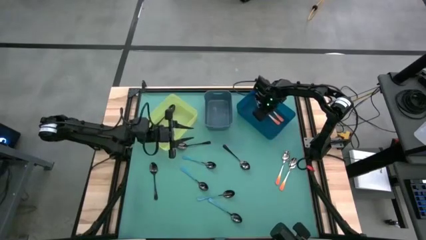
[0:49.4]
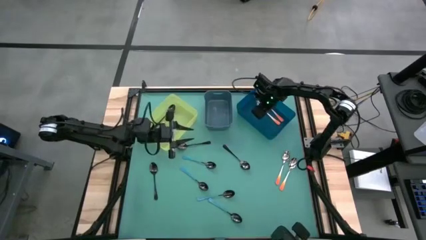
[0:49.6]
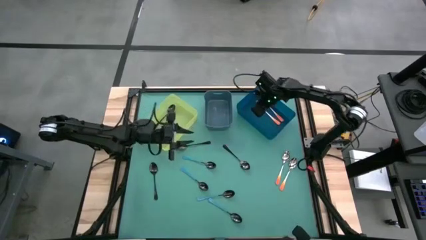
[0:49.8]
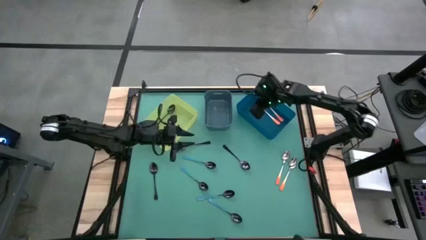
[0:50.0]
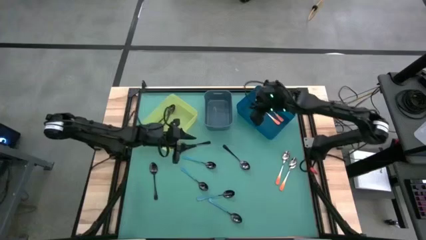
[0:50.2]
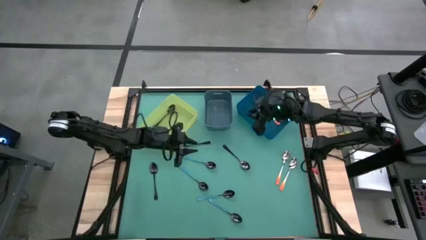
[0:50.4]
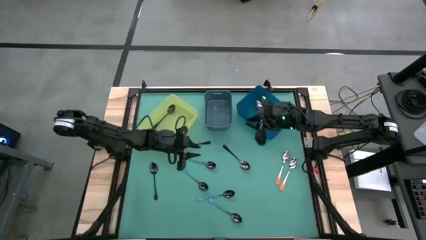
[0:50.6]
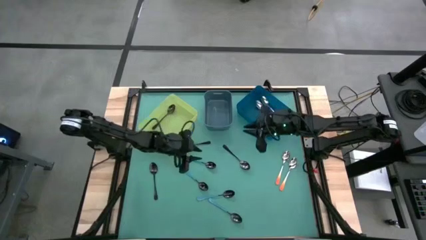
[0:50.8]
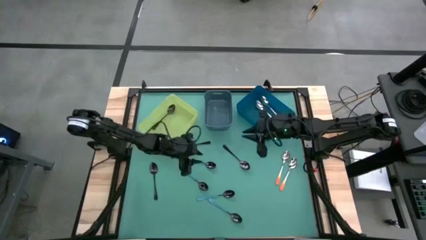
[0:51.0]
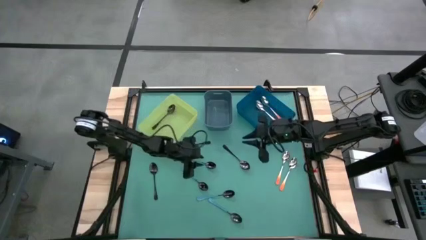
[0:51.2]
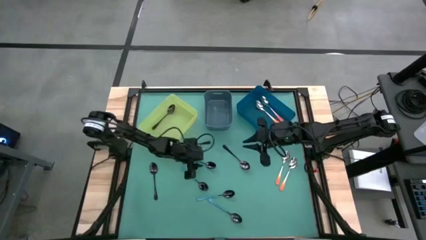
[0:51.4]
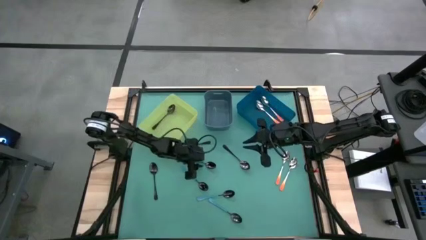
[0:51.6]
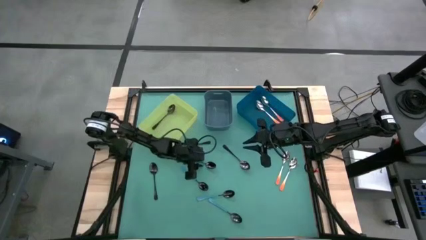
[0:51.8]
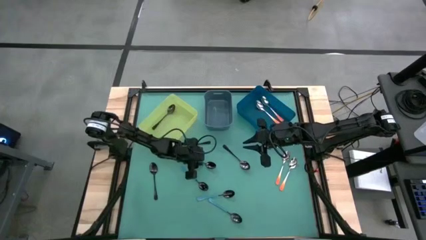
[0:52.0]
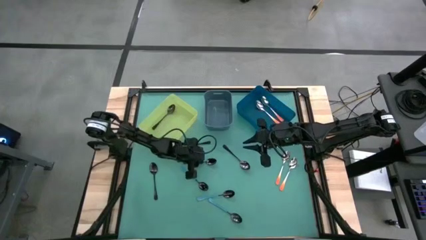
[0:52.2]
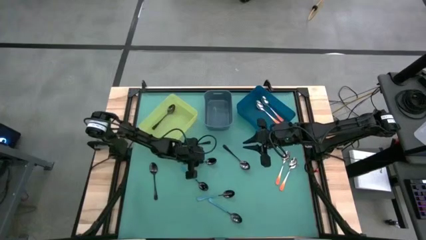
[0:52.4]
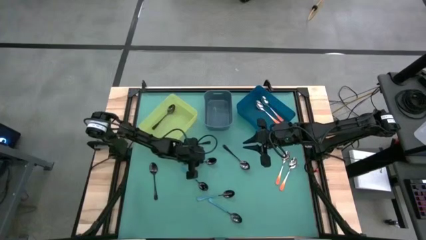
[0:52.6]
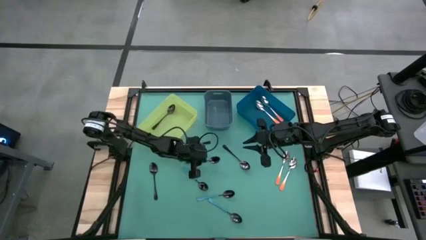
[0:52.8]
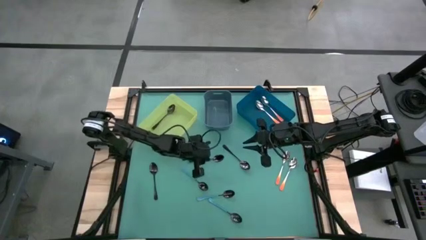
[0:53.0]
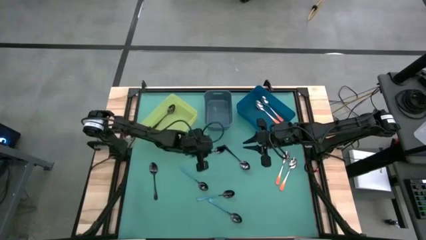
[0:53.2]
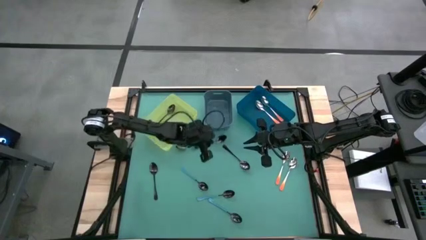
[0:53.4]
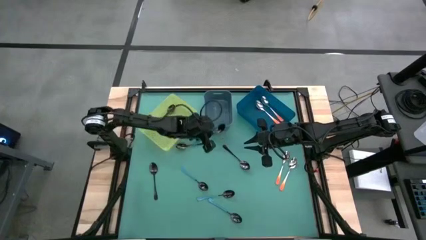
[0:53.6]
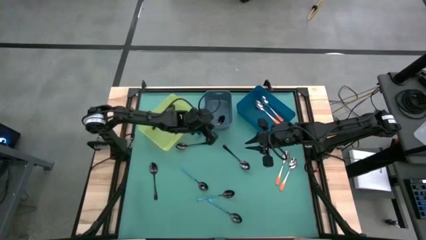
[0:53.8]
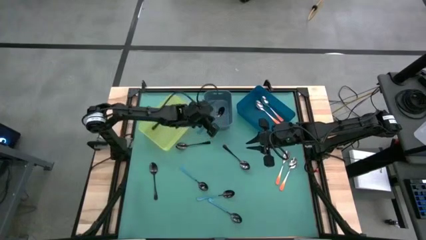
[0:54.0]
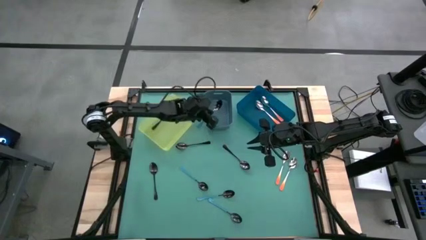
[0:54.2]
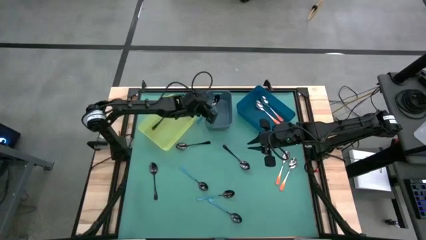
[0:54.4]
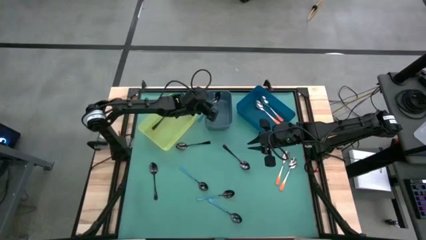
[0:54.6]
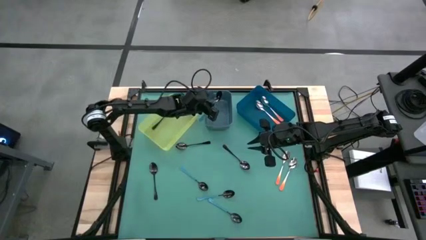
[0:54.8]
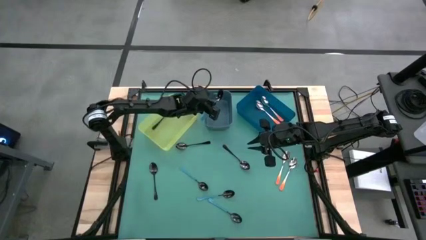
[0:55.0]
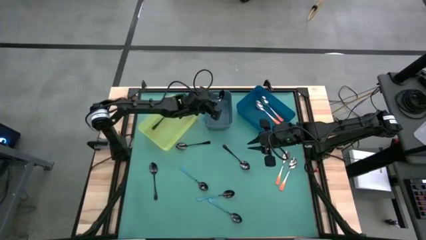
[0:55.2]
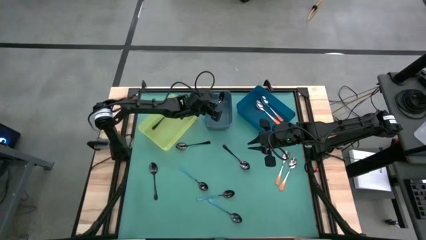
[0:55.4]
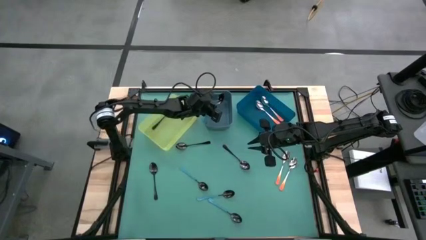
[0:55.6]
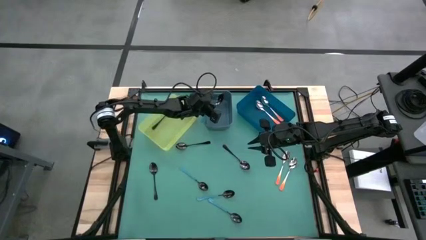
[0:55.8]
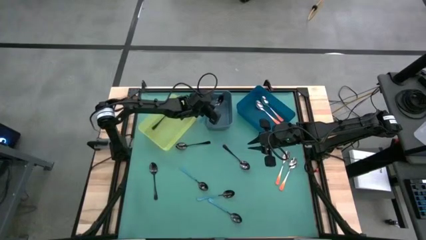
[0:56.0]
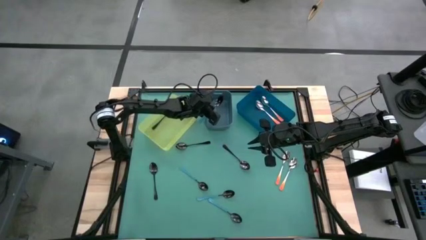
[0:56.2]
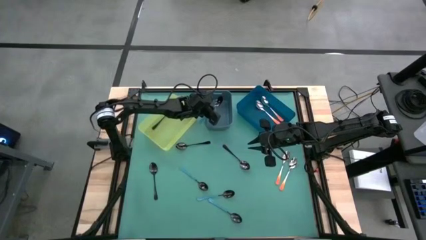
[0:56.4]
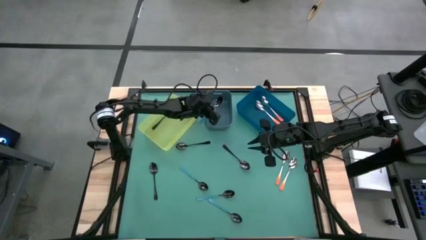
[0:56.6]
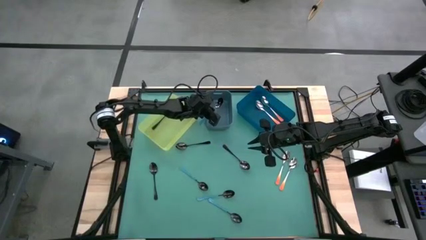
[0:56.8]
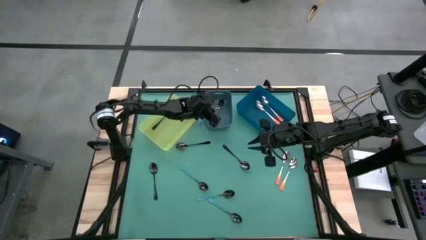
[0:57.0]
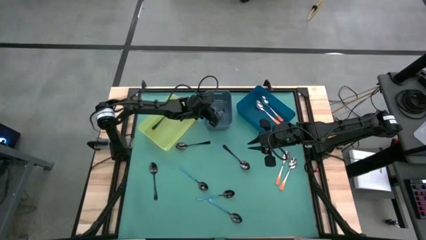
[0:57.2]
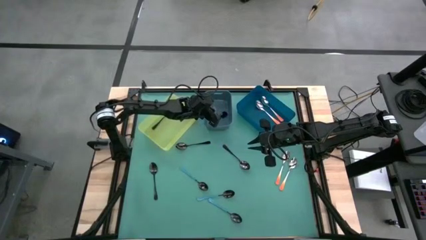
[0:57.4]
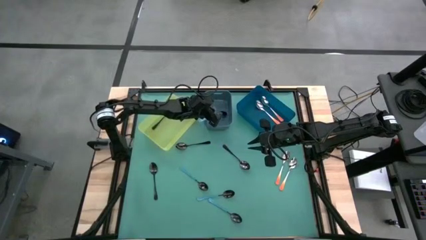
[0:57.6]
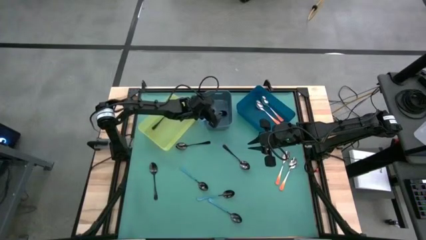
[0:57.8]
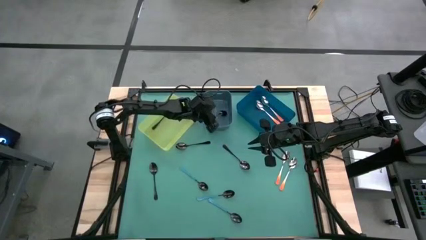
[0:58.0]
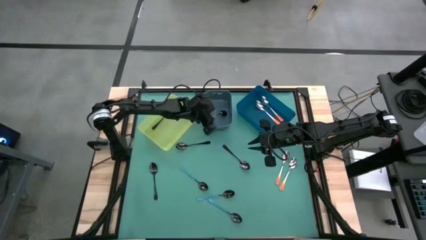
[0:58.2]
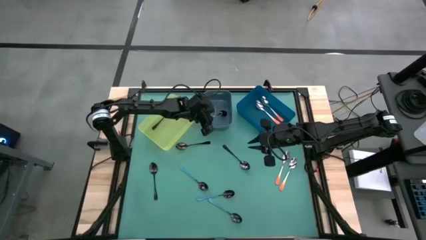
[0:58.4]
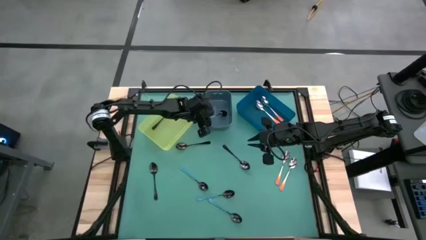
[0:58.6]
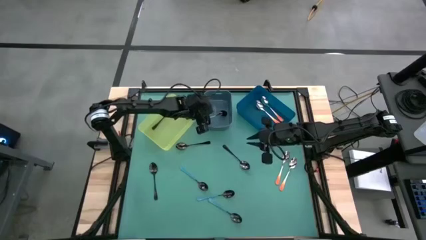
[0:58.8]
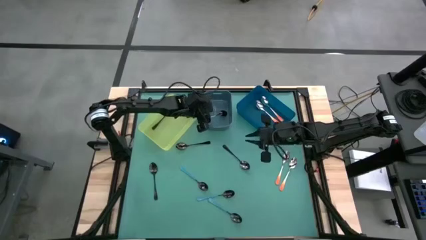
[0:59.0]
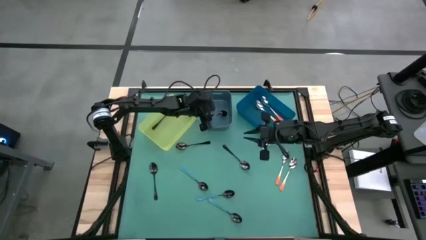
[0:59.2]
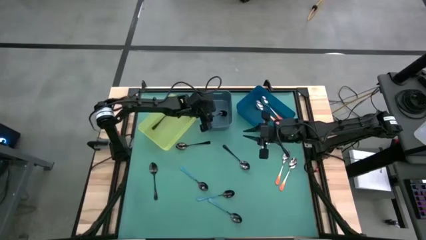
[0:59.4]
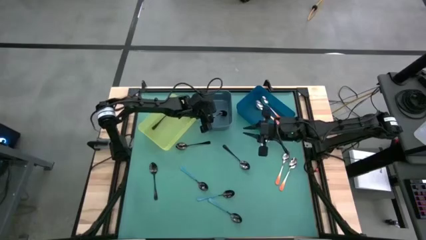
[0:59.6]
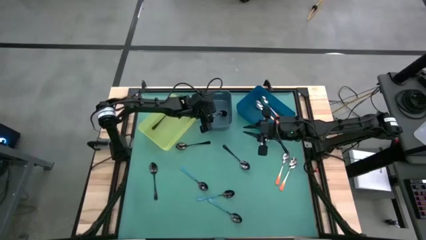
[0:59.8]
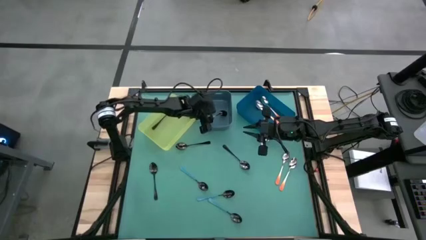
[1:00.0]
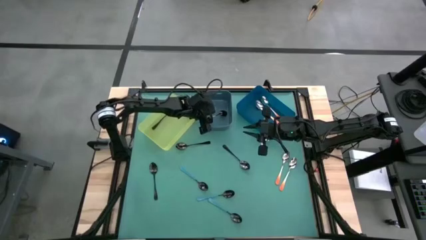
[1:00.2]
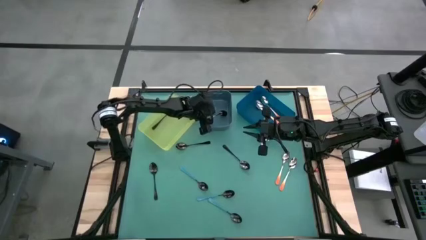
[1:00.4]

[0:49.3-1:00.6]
Task: Sort silverware by color (type)
Put the blue spoon into the dark blue bin
